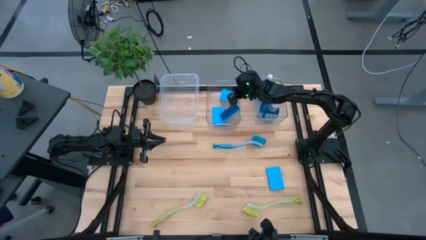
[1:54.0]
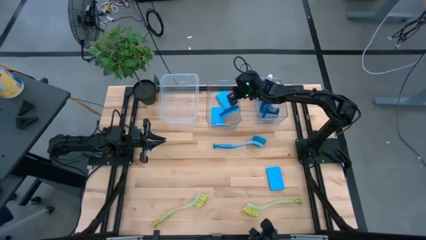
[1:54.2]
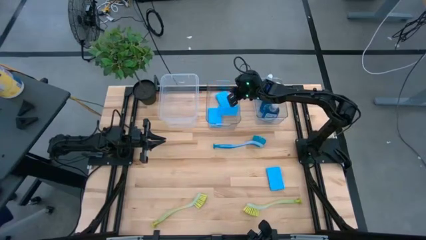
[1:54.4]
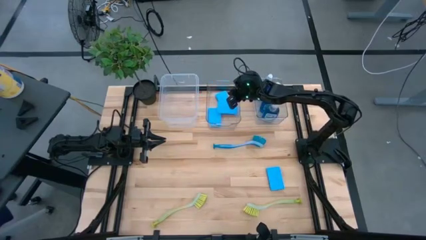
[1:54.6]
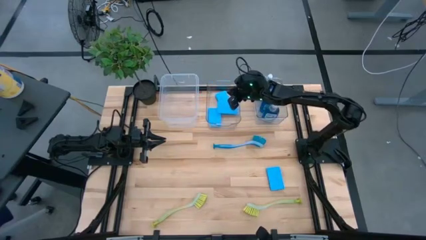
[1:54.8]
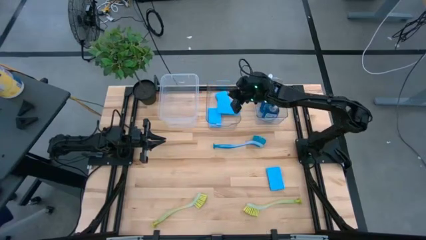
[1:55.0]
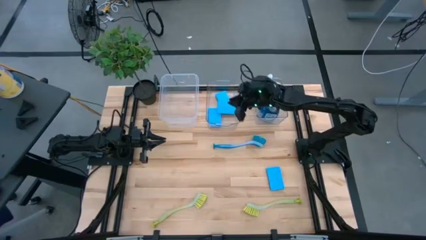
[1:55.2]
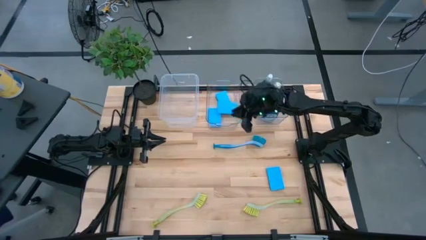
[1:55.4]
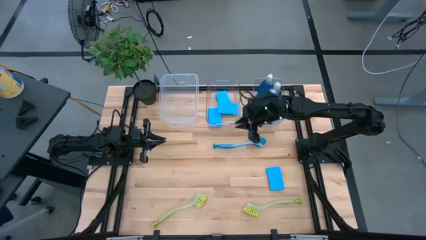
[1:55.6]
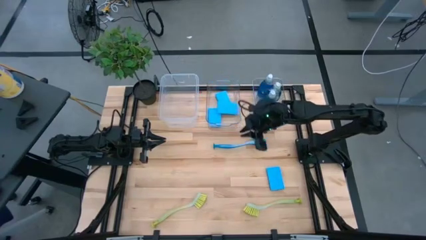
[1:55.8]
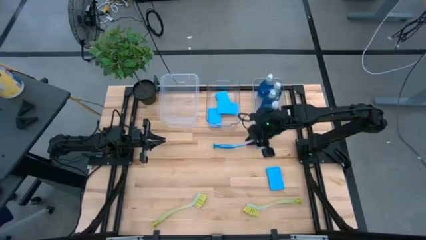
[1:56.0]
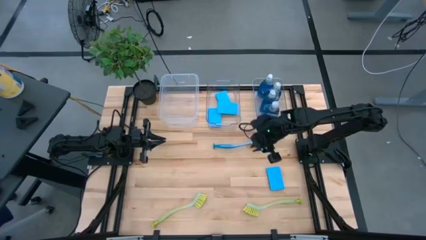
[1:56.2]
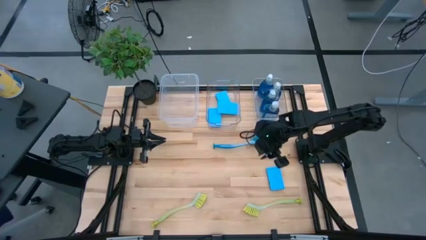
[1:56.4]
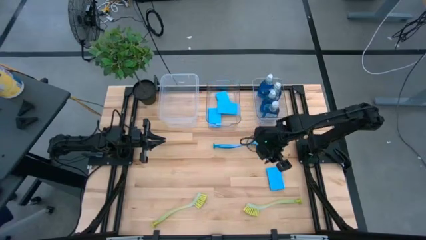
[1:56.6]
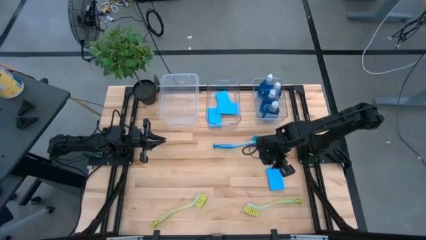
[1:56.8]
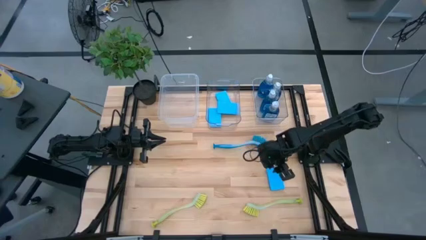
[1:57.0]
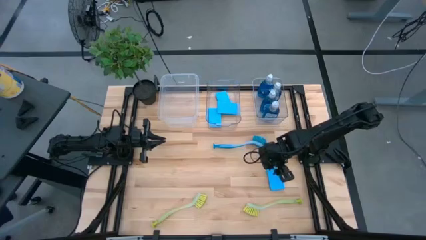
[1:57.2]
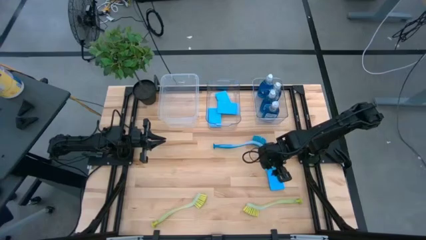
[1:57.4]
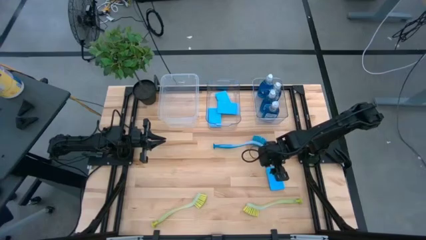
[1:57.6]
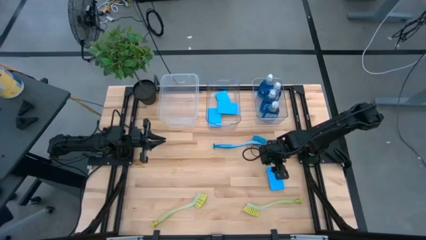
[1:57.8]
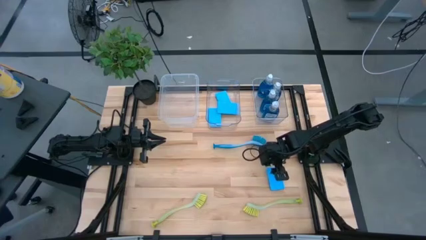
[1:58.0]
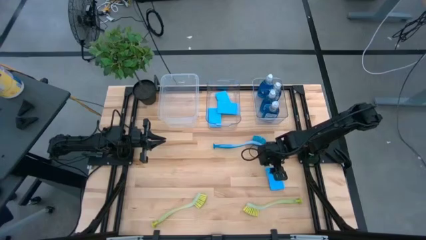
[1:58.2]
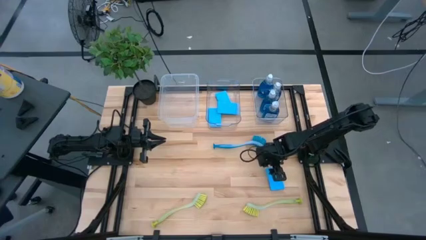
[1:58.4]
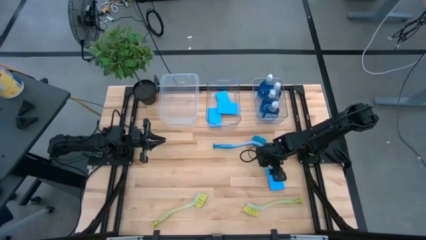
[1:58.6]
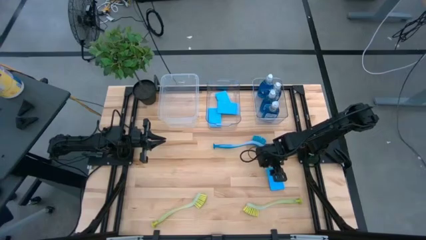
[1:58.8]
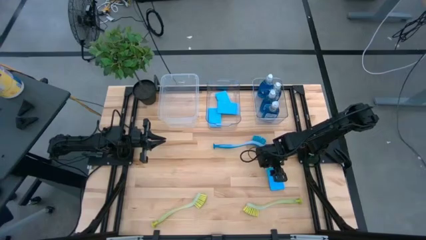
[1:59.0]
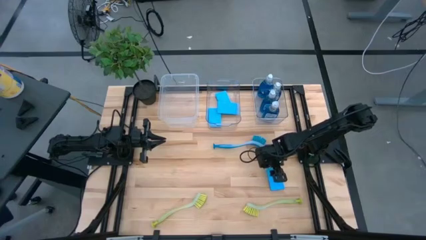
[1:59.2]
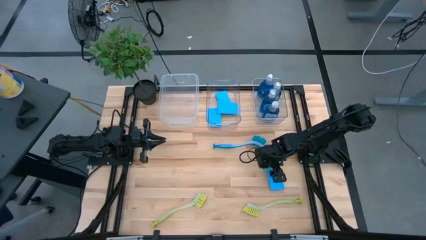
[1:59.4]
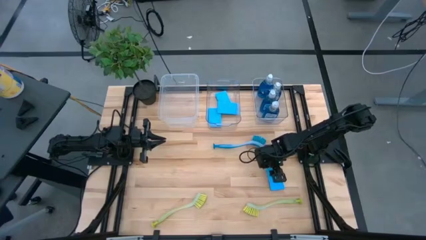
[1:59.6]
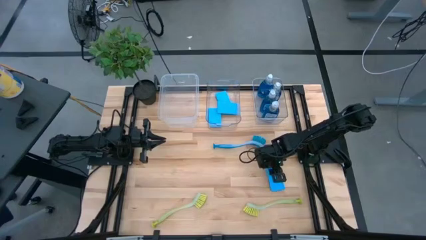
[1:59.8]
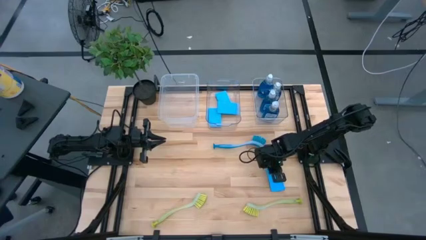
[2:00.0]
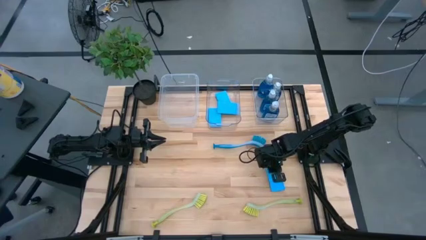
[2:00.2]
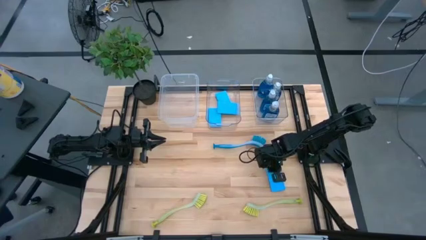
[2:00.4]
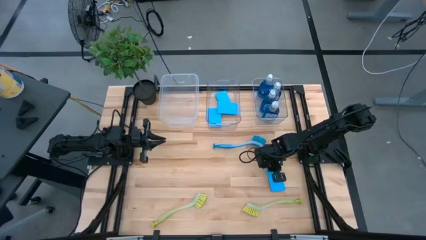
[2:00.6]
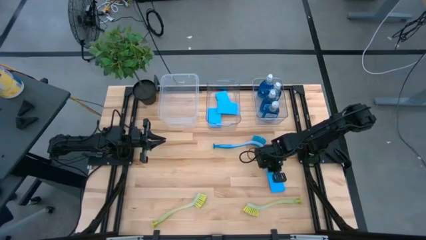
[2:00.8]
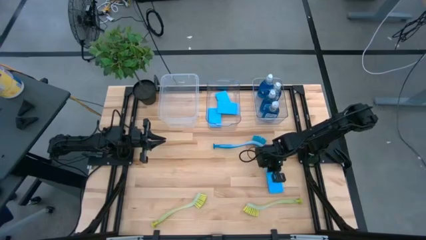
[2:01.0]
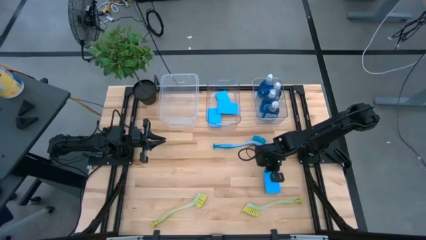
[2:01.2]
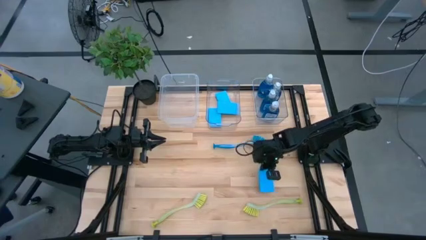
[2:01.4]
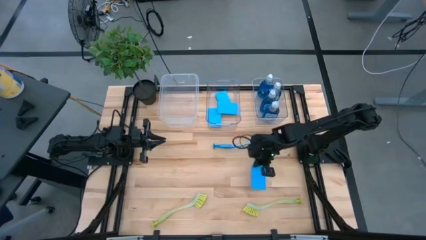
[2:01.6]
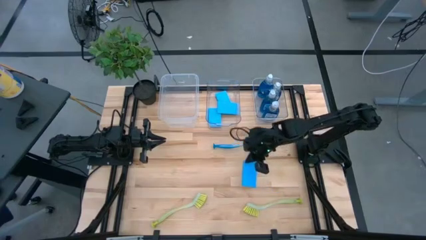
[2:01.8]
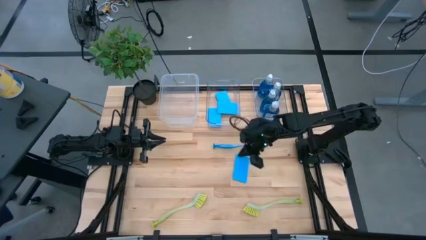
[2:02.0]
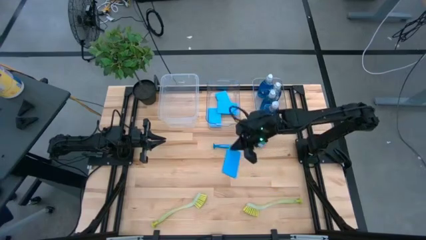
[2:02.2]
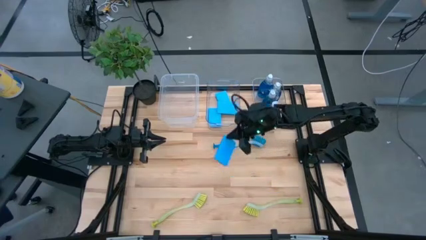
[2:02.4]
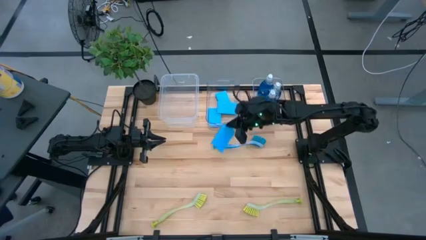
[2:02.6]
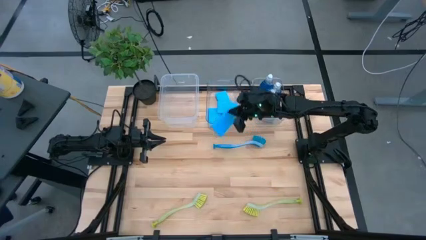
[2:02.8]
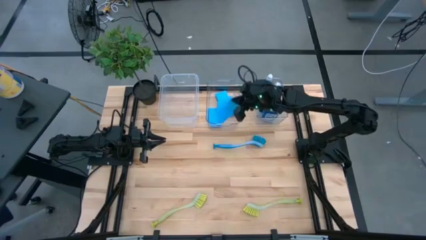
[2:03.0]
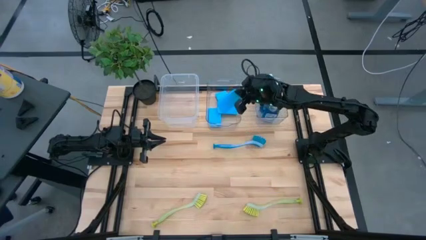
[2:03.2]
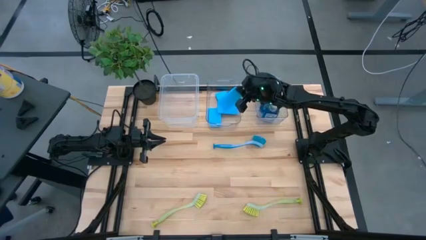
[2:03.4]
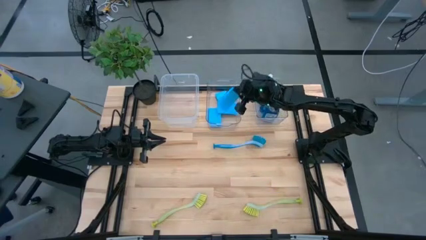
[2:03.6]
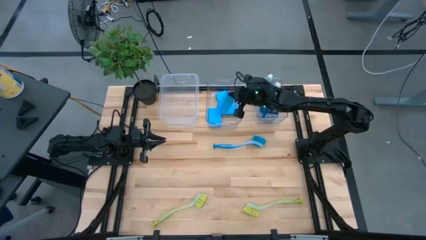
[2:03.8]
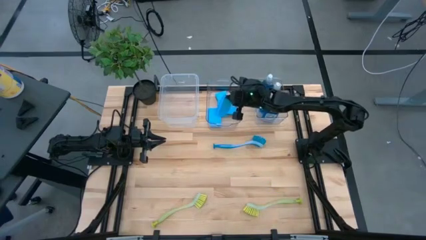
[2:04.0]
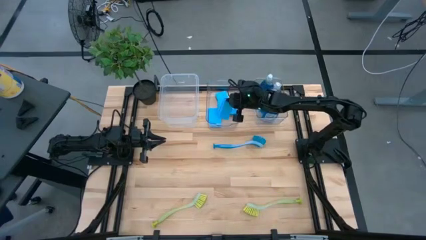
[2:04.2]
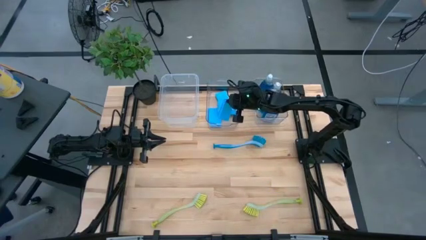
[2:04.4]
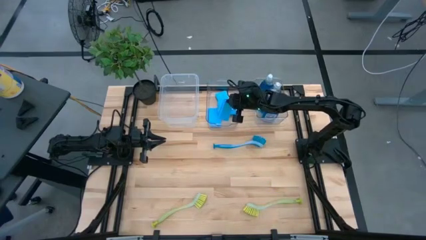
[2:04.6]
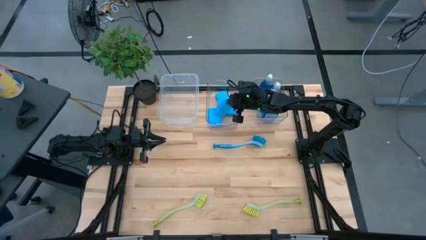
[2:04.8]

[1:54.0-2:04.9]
Task: Pick & Place Kitchen Sink Supplies
Put the blue sponge into the middle transparent bin

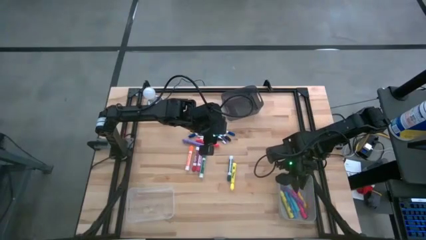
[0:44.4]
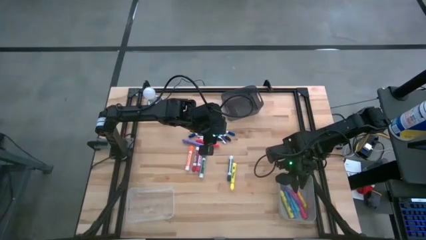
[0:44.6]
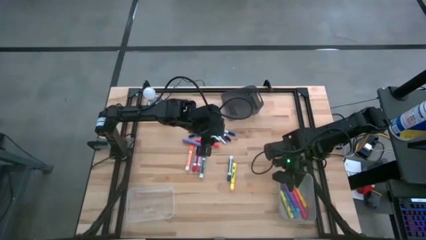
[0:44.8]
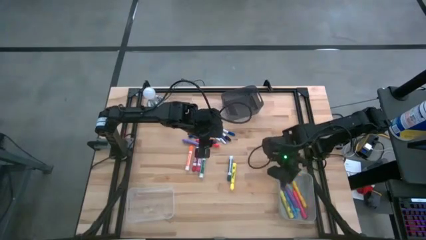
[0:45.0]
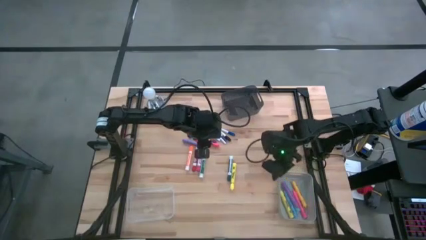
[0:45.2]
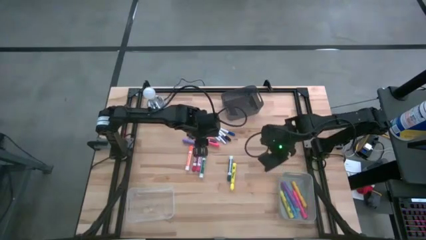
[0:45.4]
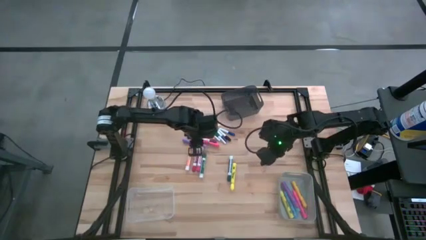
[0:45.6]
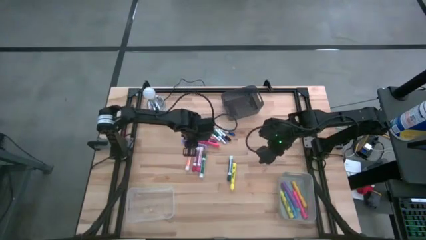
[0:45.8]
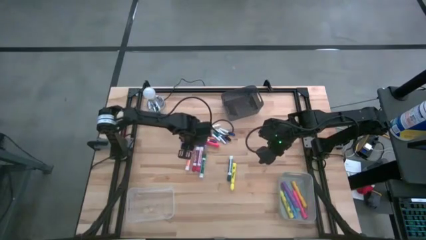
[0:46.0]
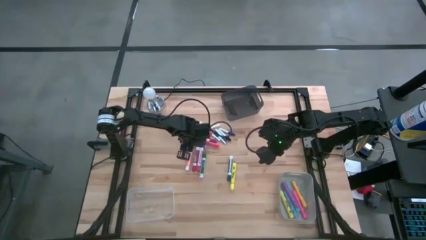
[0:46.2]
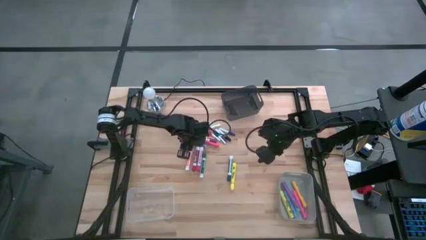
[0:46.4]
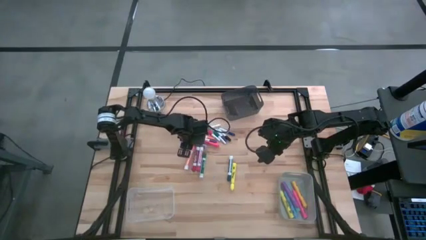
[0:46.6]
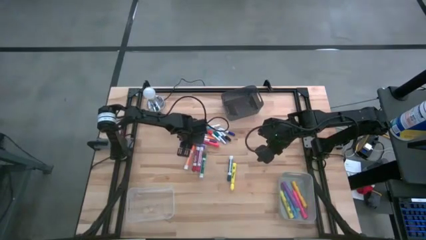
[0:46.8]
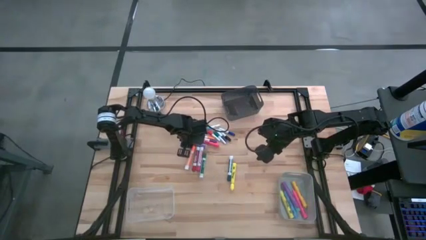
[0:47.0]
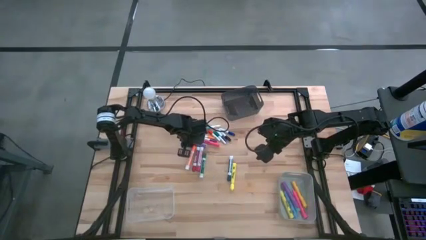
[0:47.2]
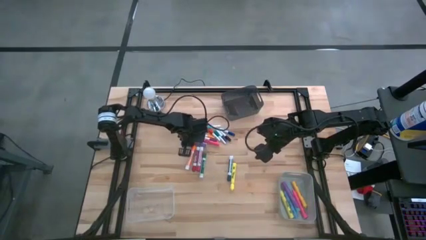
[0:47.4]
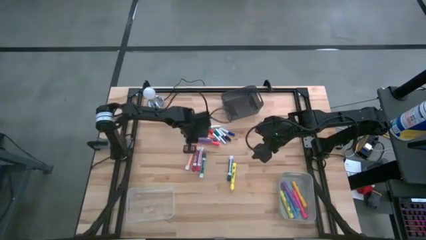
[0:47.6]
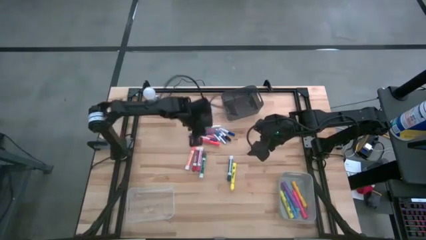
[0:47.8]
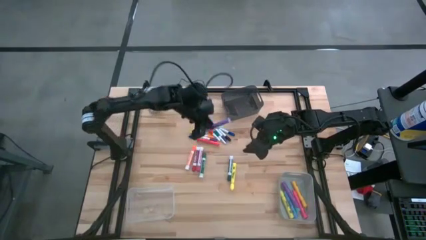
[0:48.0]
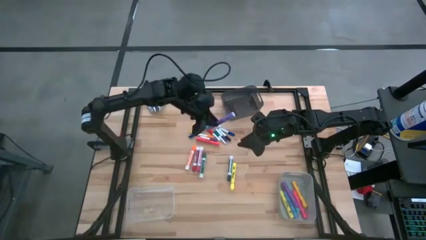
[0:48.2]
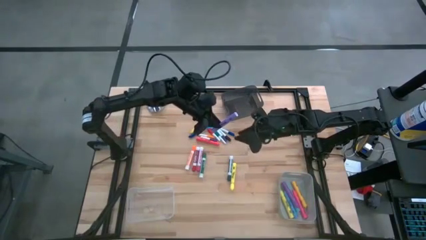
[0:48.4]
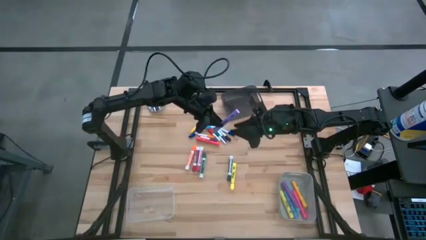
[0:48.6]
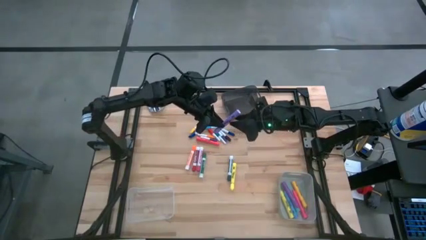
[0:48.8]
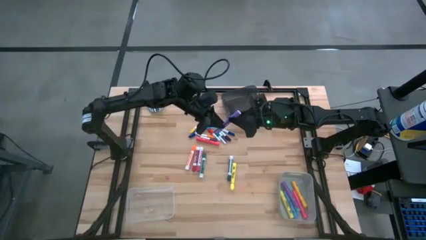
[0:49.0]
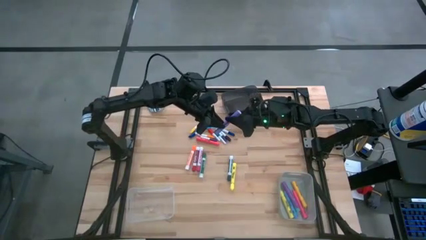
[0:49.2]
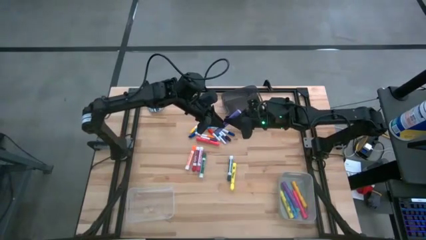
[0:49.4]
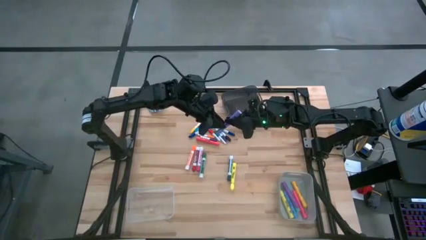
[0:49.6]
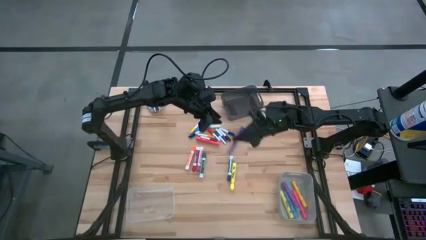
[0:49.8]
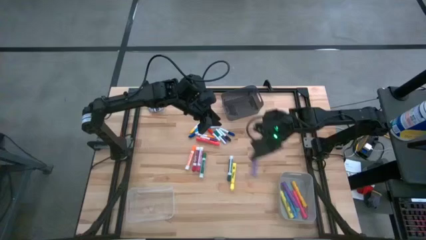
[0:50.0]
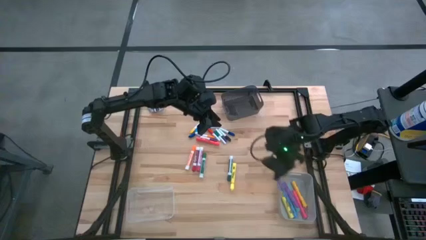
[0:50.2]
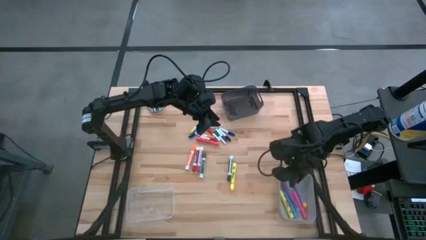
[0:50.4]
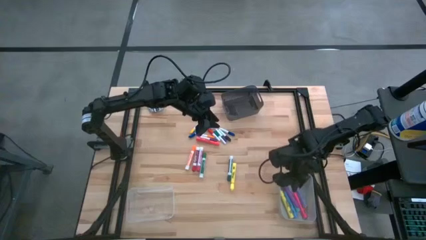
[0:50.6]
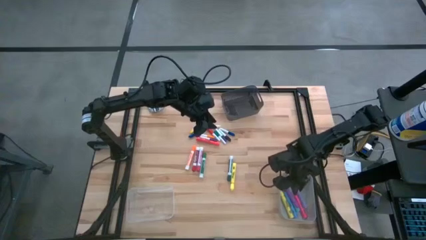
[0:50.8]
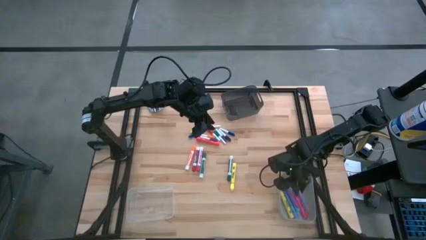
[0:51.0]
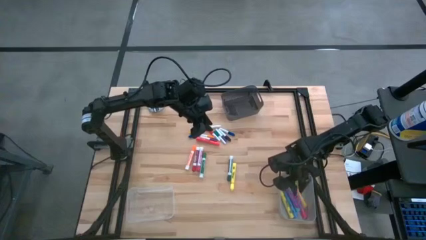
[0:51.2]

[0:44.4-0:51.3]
Task: Pick & Place Markers
Put the purple highlighter pen into the gray bin
